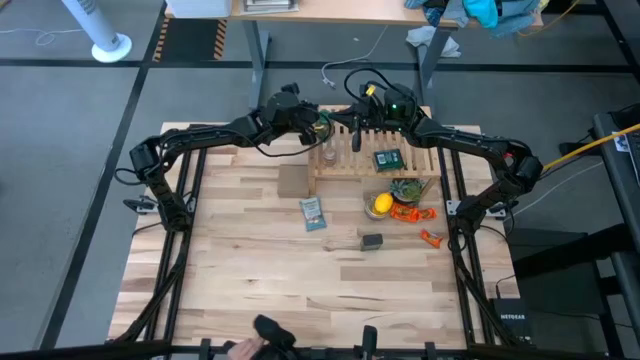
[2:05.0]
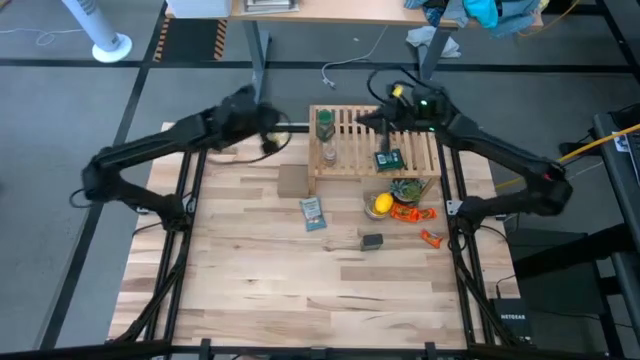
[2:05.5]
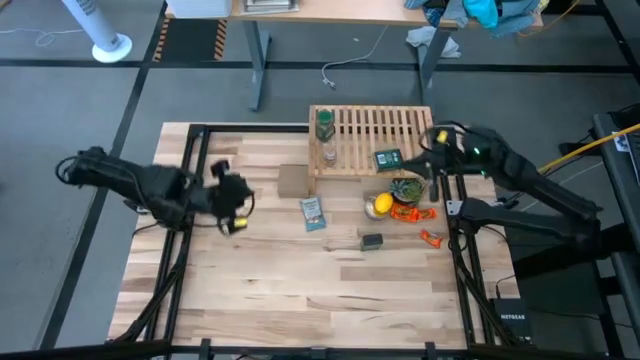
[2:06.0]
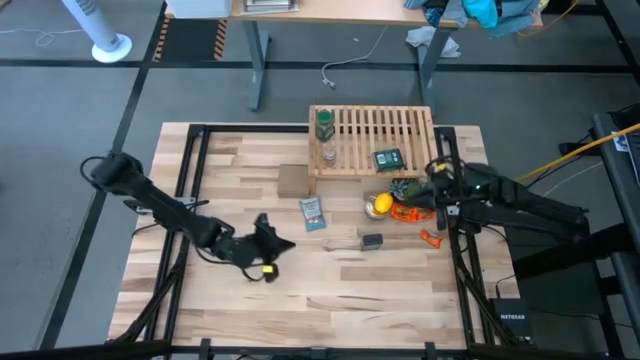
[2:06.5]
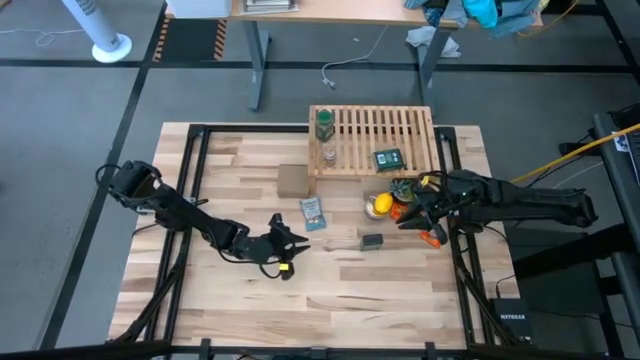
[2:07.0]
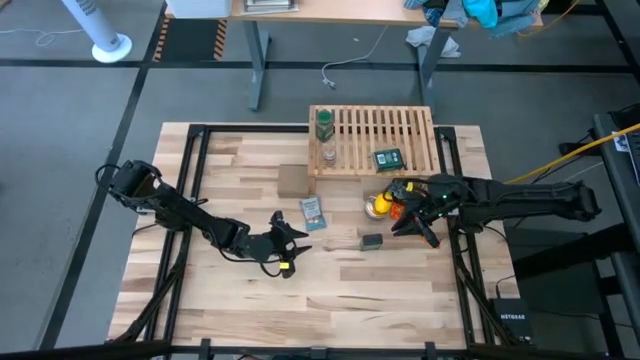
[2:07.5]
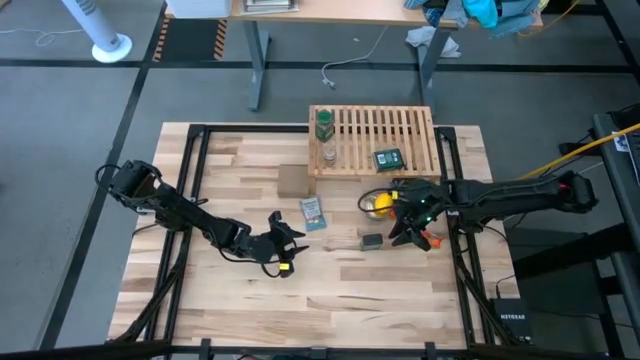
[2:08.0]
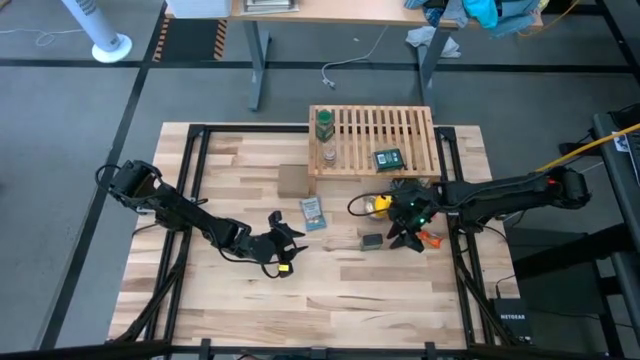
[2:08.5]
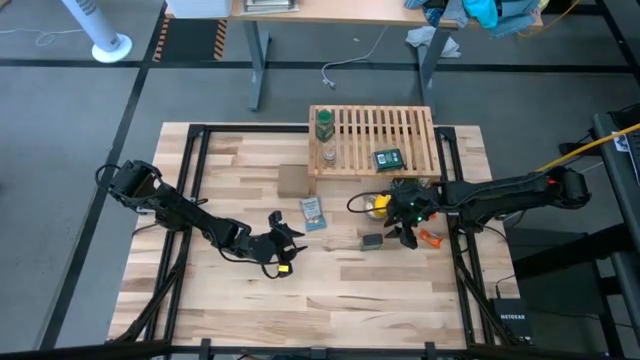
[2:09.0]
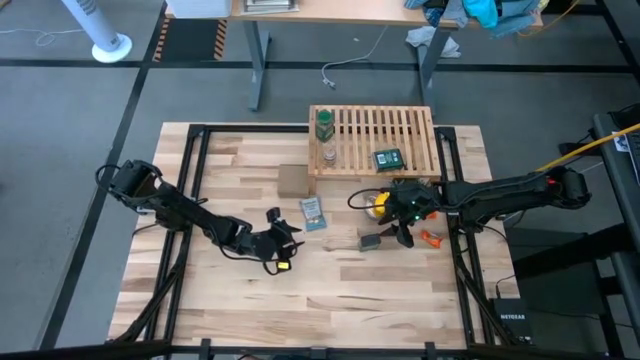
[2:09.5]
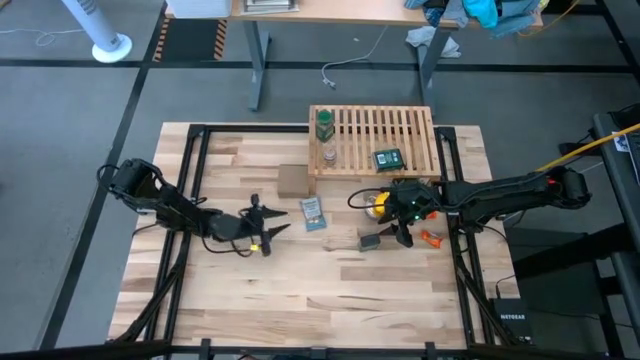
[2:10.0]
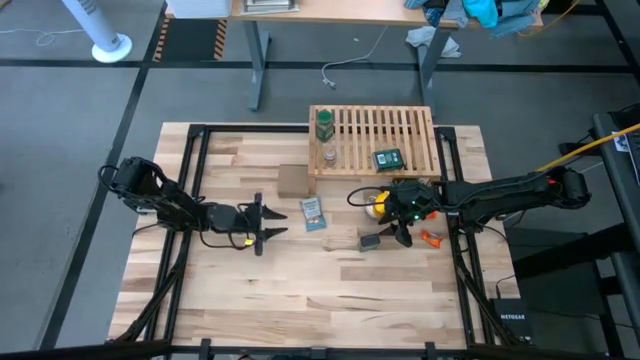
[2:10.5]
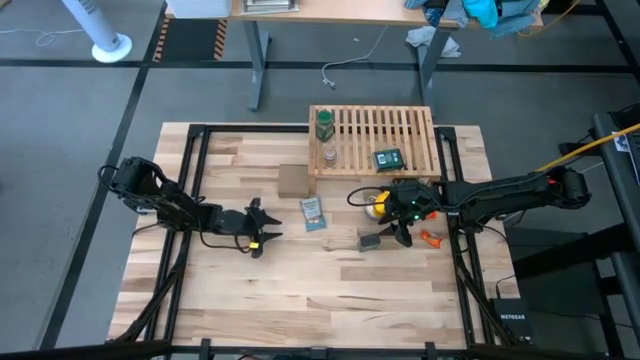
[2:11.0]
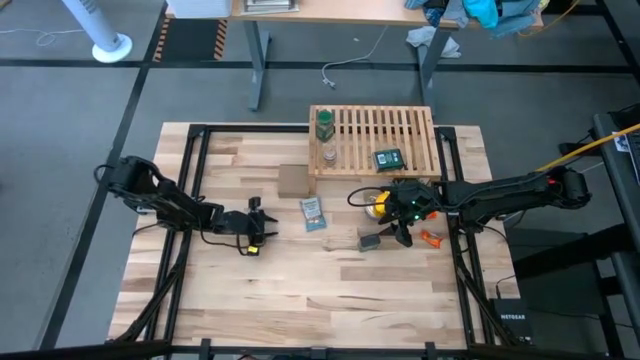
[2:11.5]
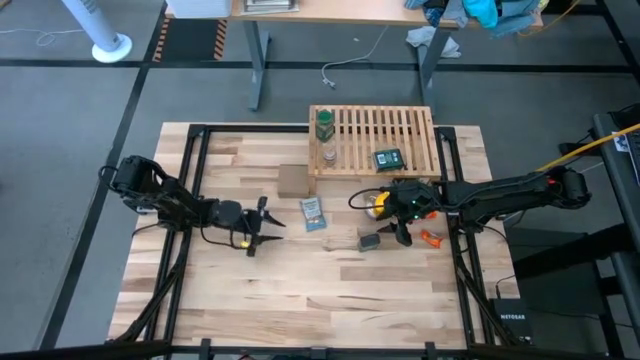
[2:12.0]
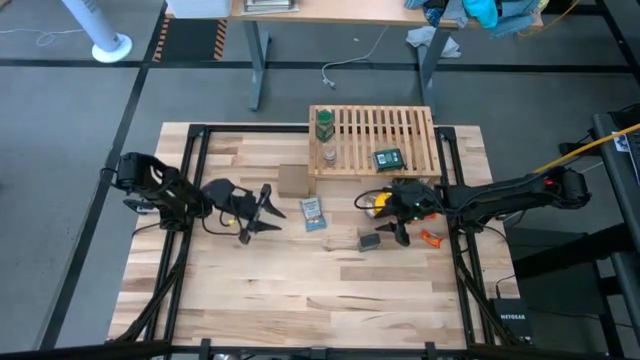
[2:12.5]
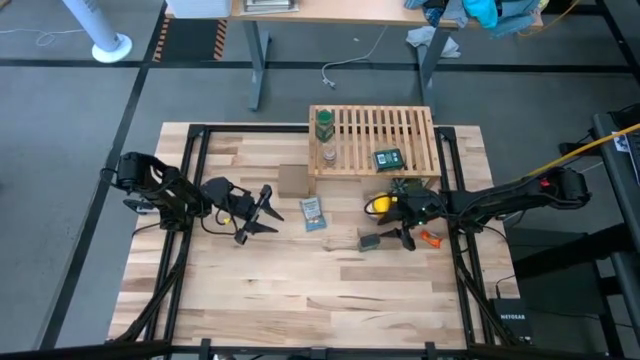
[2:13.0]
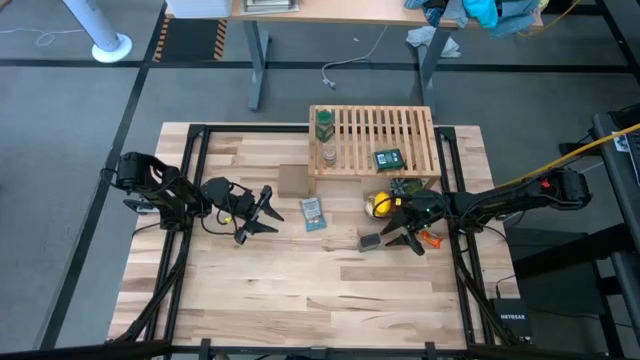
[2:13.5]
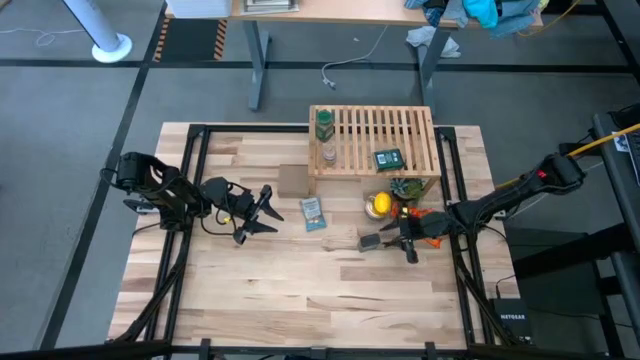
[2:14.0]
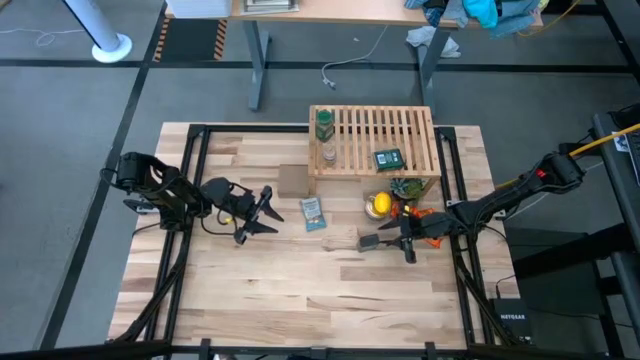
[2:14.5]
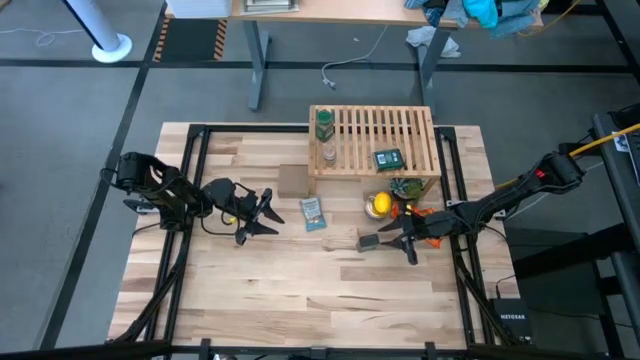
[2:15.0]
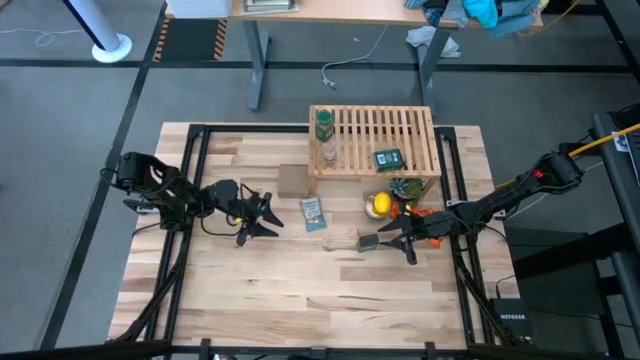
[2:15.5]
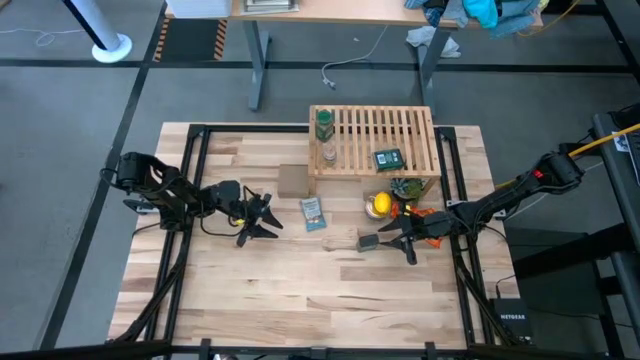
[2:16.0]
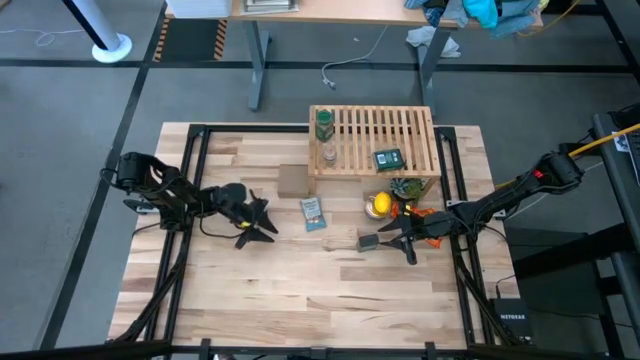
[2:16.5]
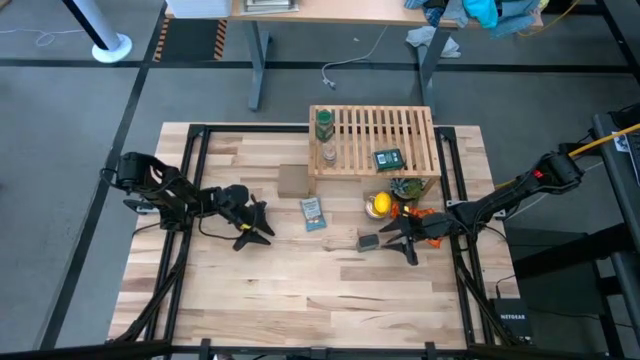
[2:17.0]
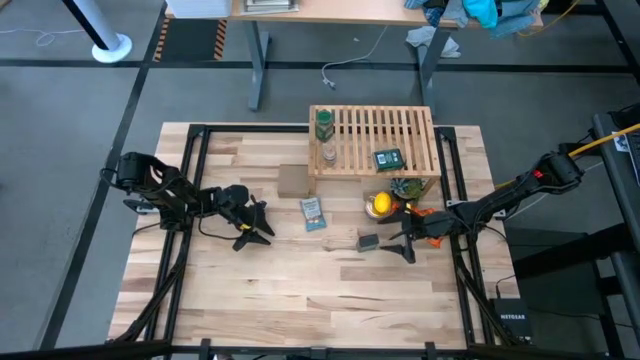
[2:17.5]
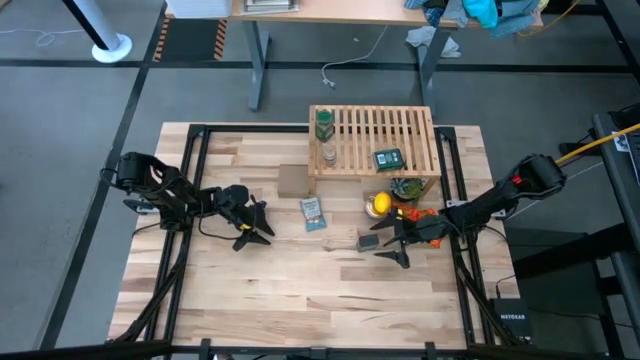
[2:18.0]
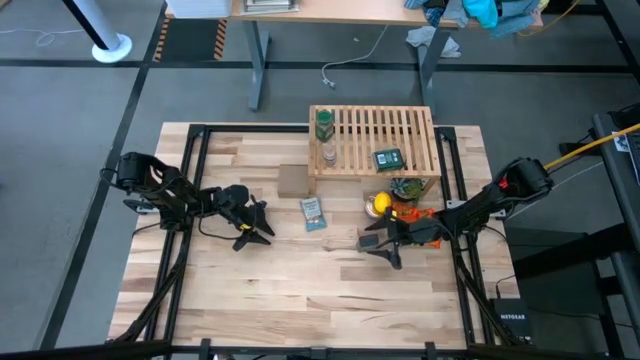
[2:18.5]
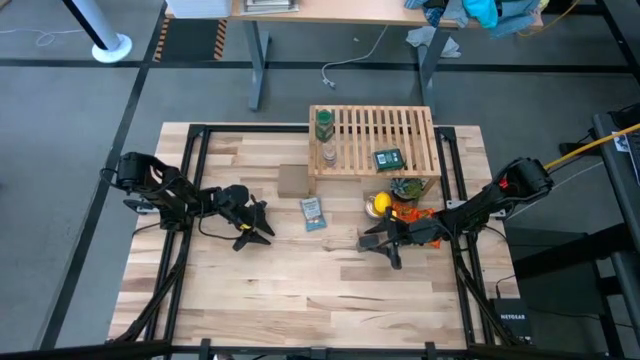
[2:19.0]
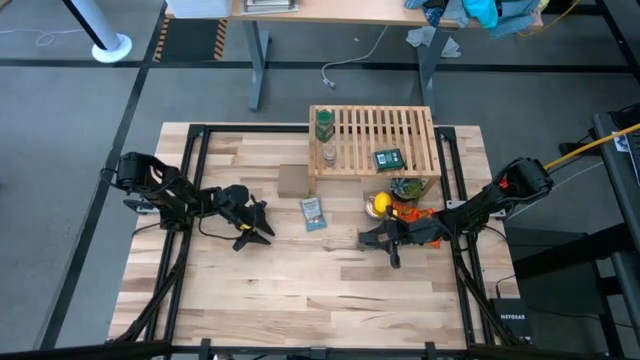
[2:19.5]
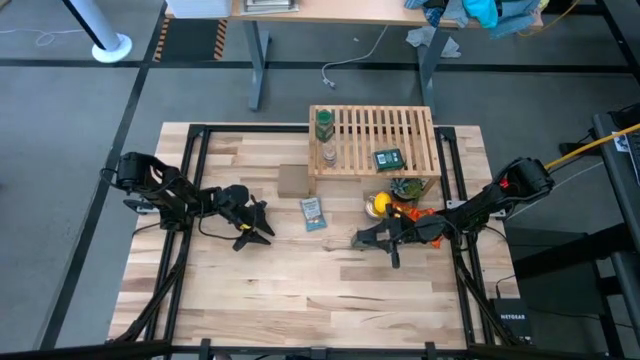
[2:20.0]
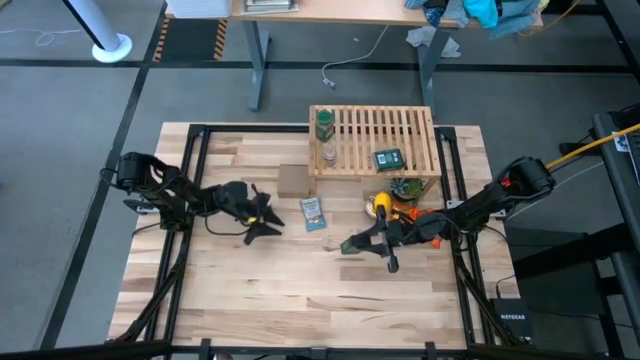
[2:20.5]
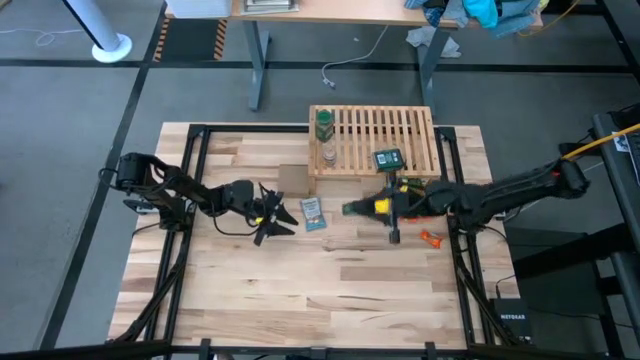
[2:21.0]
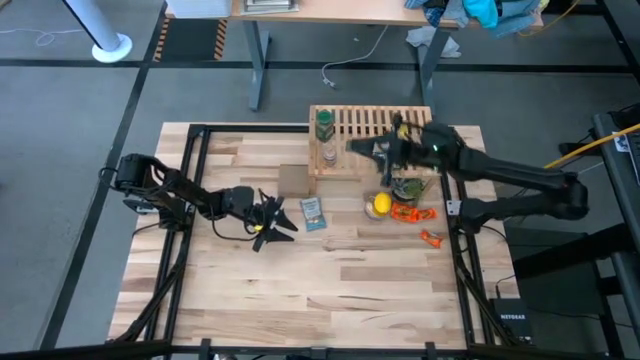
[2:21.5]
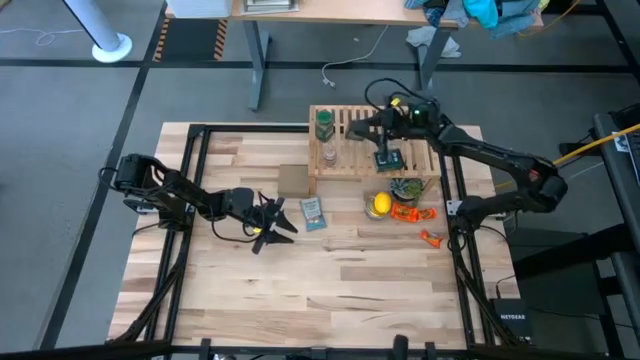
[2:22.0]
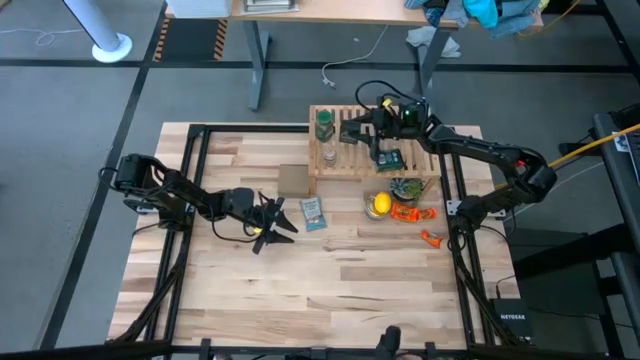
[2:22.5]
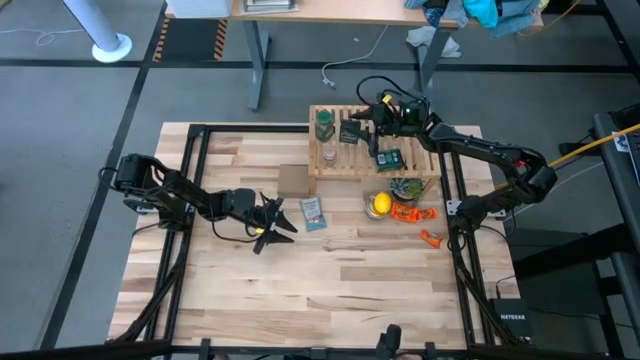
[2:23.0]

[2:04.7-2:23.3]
Task: Shelf spices
Put the black seasoning can on the shelf

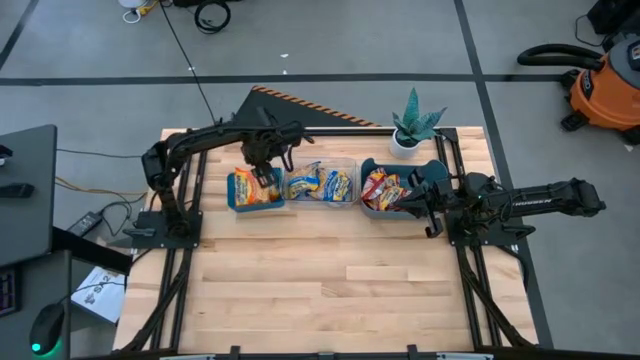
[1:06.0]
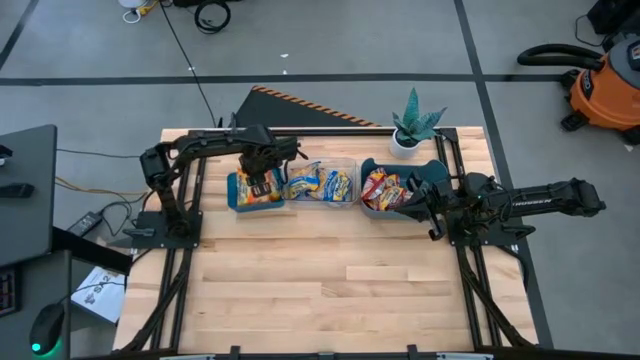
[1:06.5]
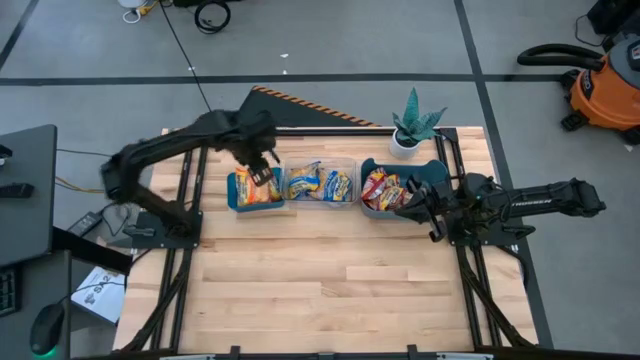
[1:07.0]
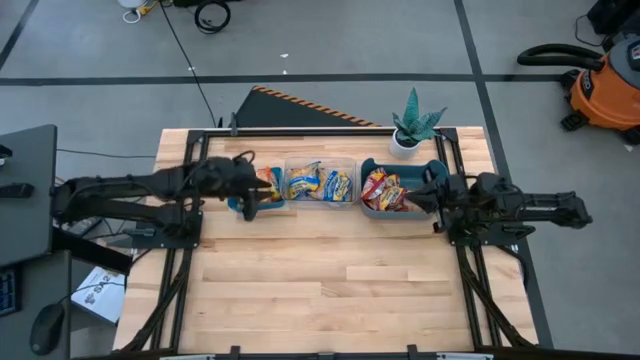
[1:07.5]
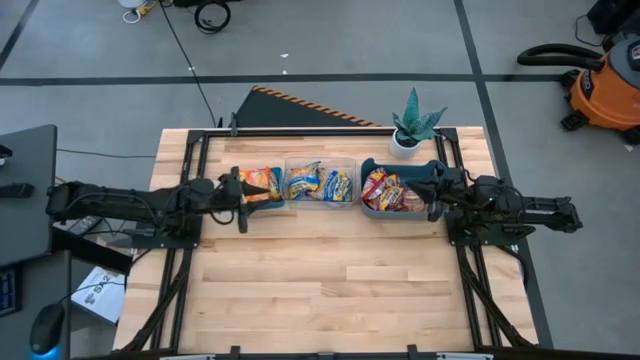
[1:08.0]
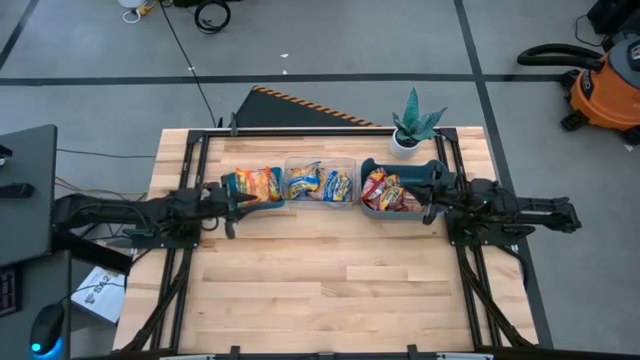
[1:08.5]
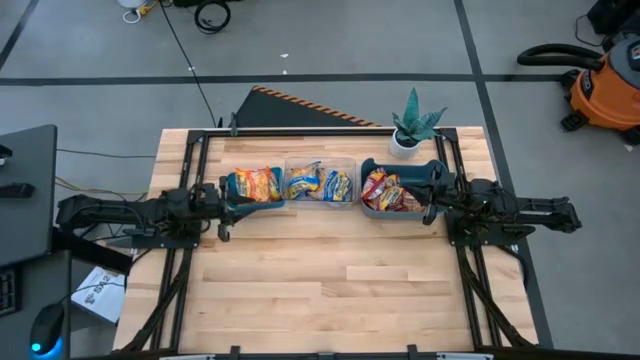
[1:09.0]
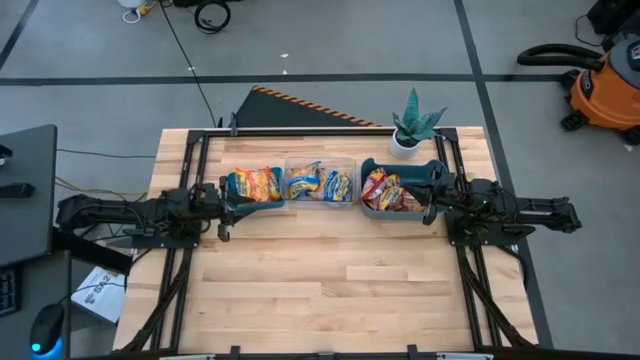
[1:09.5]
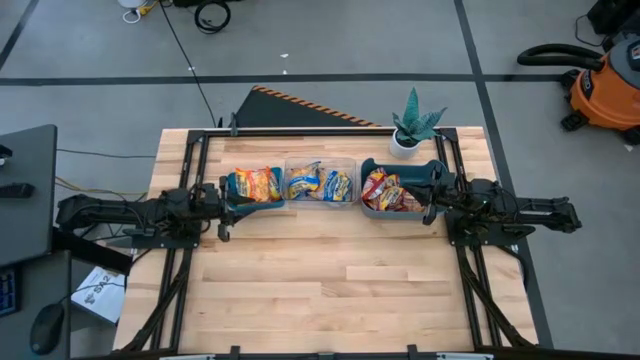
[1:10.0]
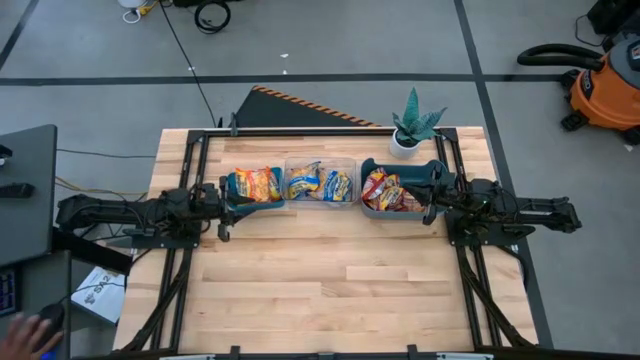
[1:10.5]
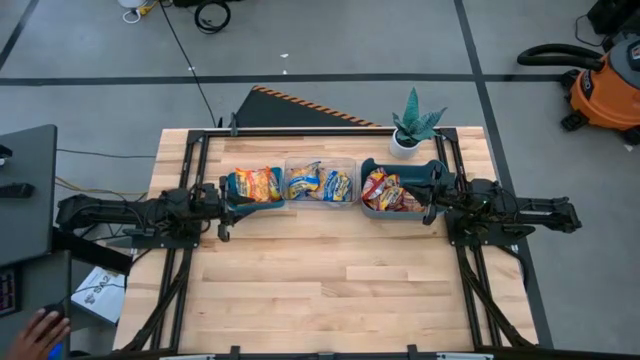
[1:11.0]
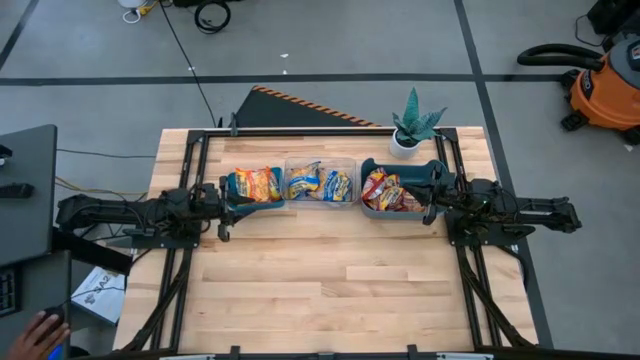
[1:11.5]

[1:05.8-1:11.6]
Task: Sort Maruchan noodles
Return to Home Position
